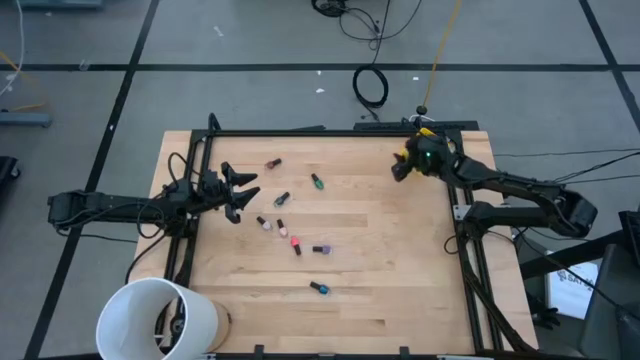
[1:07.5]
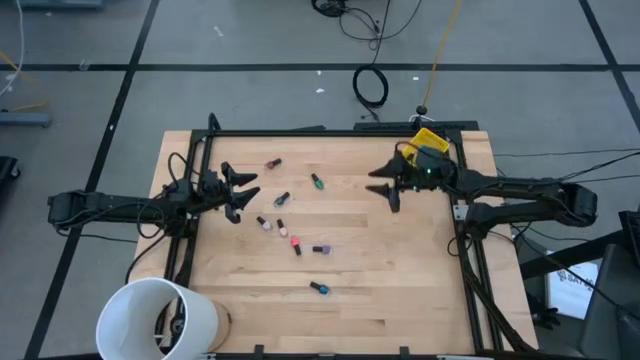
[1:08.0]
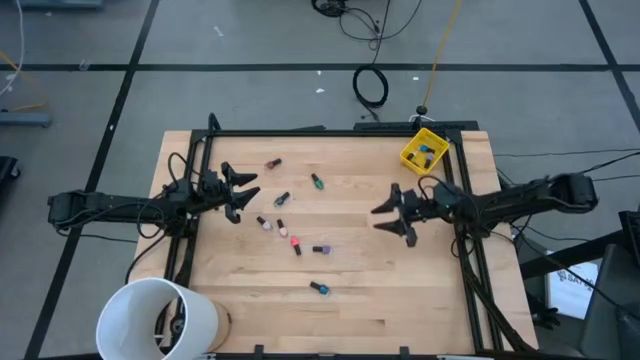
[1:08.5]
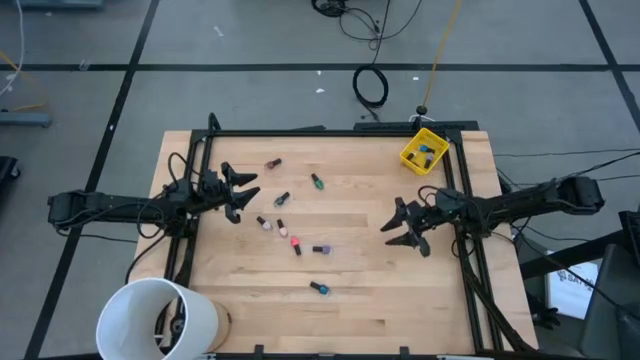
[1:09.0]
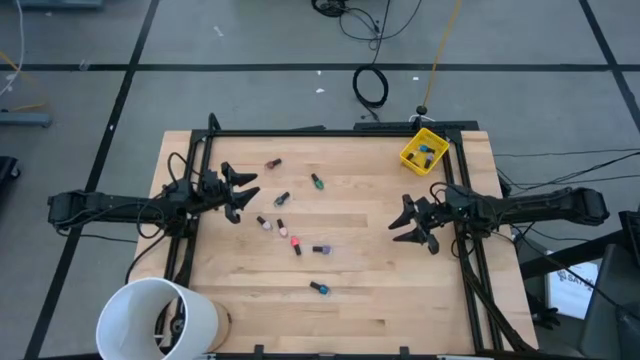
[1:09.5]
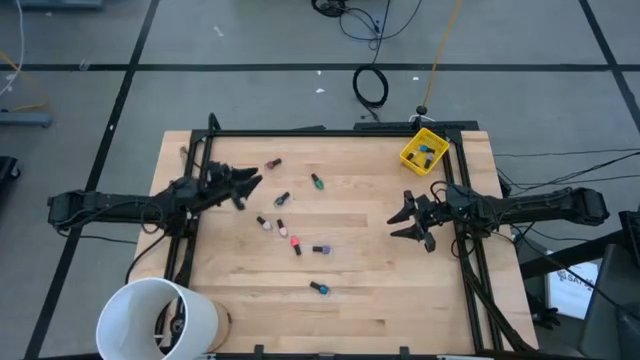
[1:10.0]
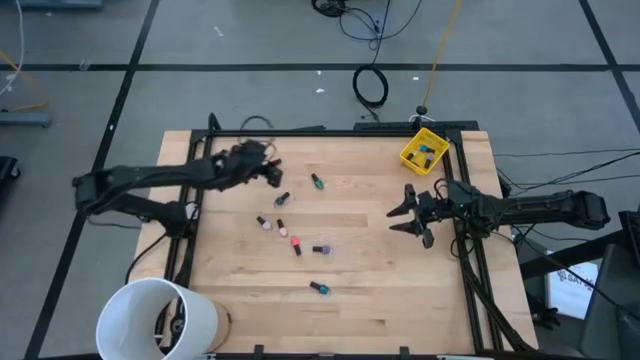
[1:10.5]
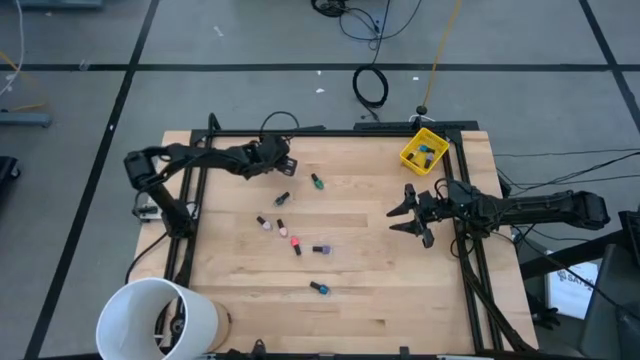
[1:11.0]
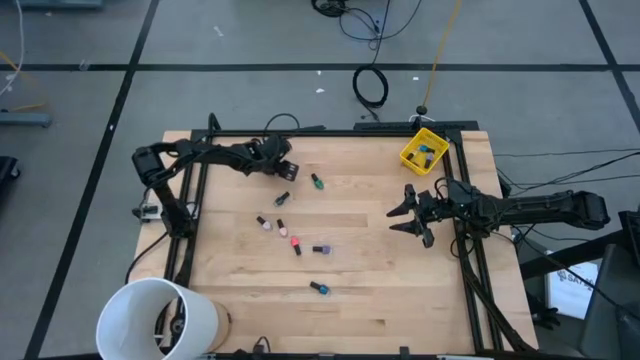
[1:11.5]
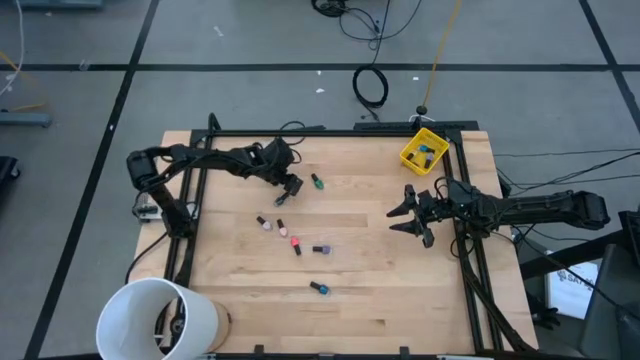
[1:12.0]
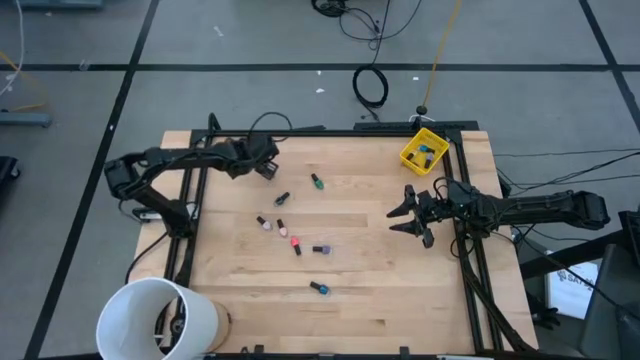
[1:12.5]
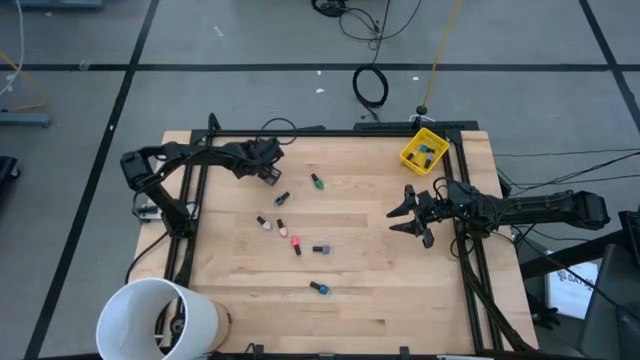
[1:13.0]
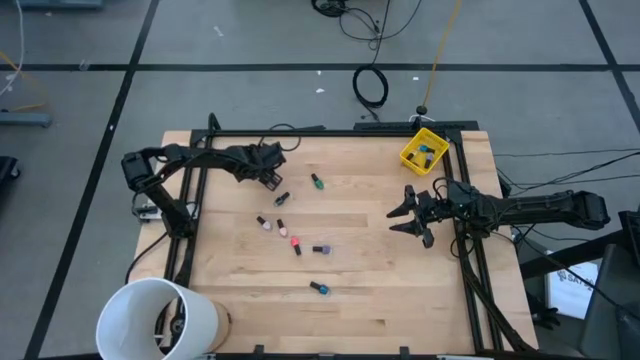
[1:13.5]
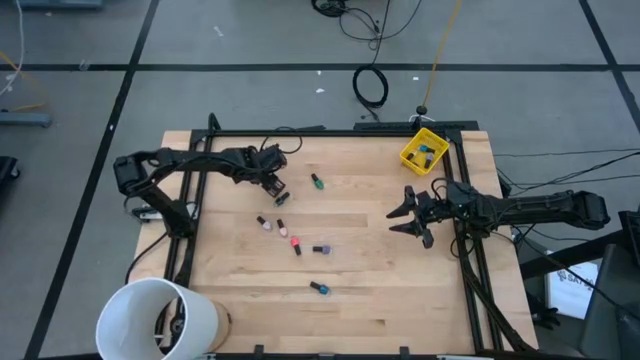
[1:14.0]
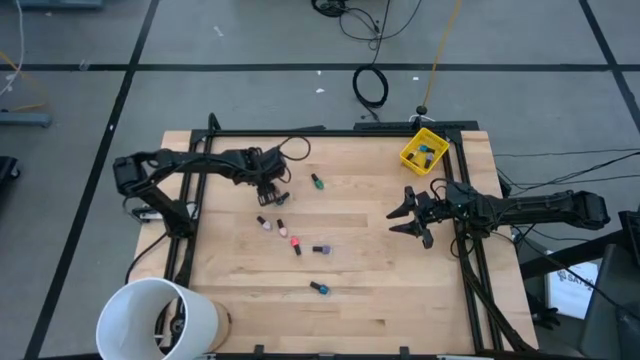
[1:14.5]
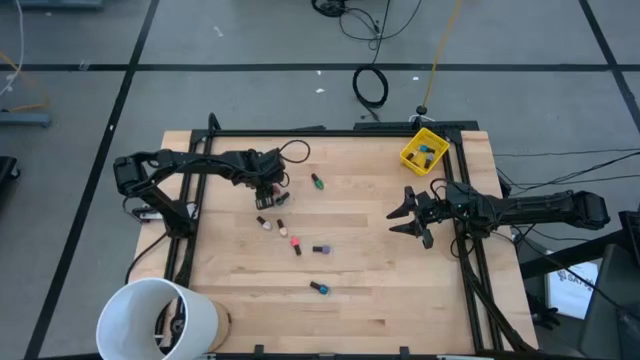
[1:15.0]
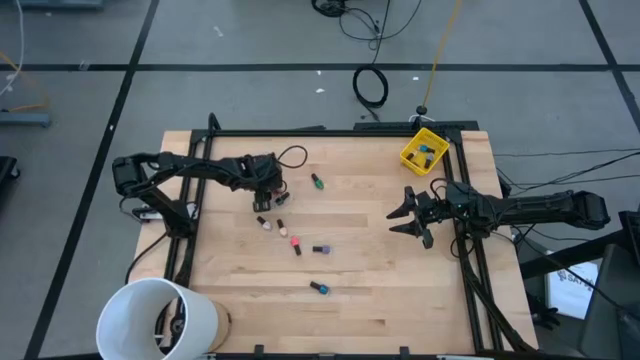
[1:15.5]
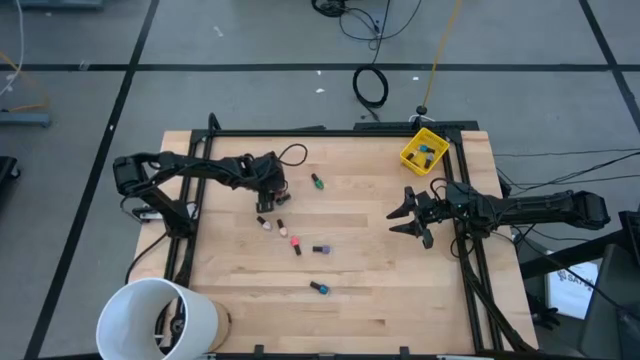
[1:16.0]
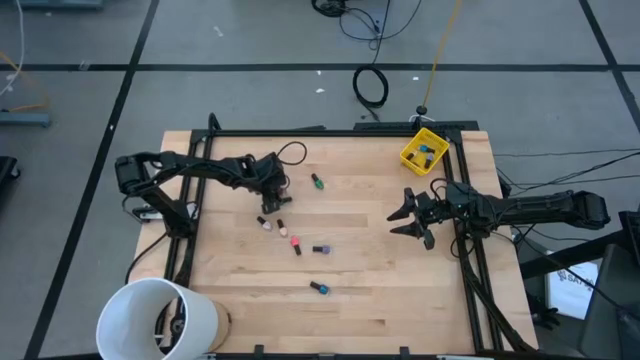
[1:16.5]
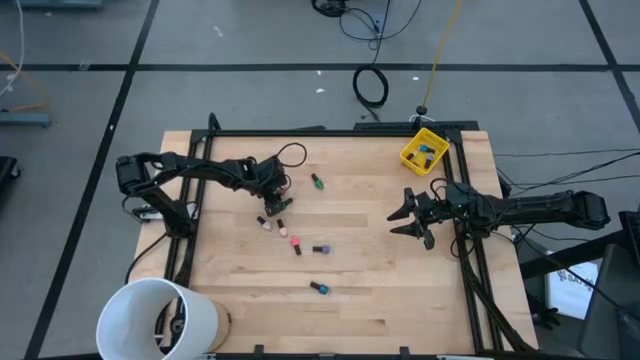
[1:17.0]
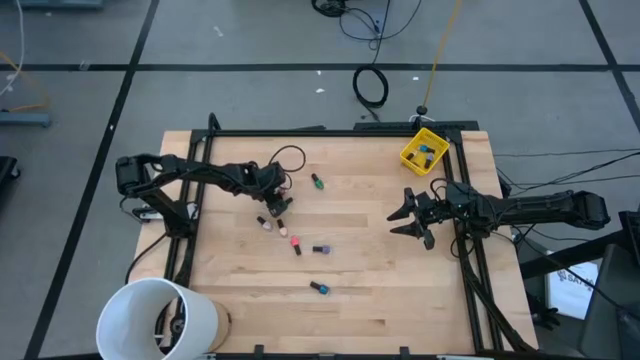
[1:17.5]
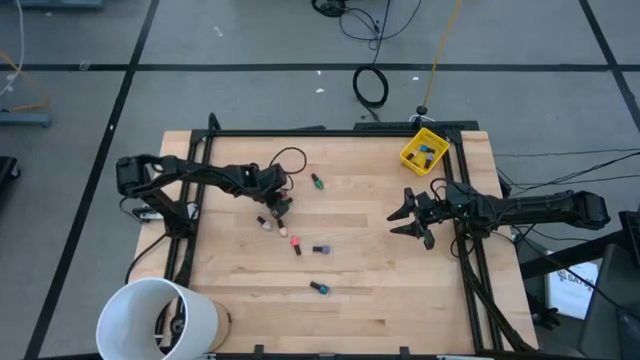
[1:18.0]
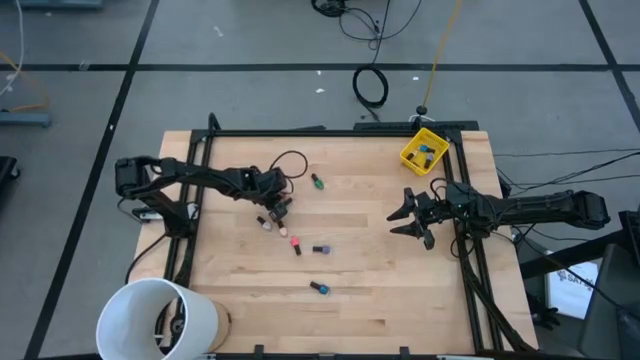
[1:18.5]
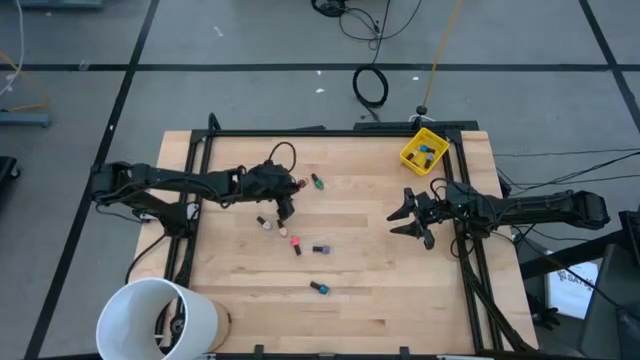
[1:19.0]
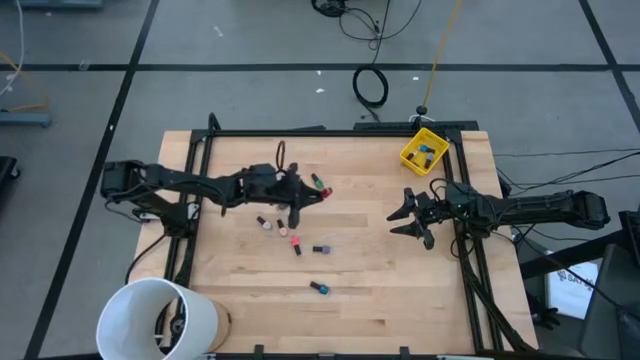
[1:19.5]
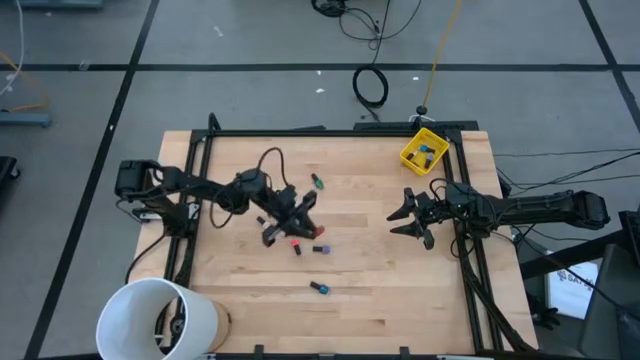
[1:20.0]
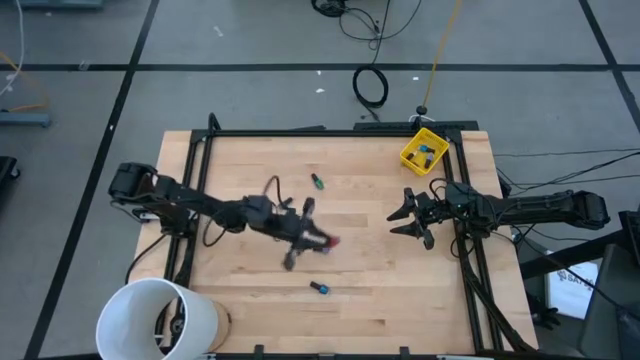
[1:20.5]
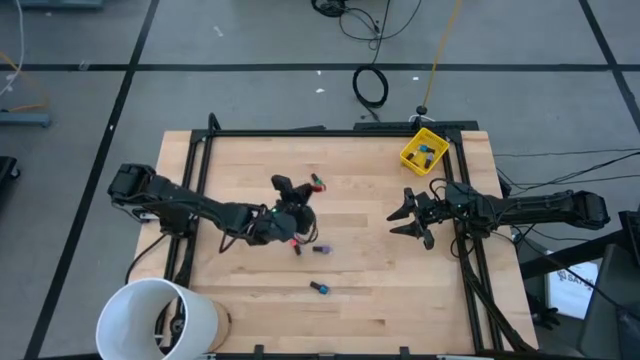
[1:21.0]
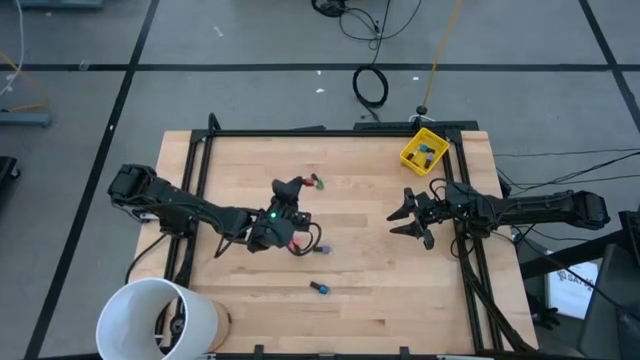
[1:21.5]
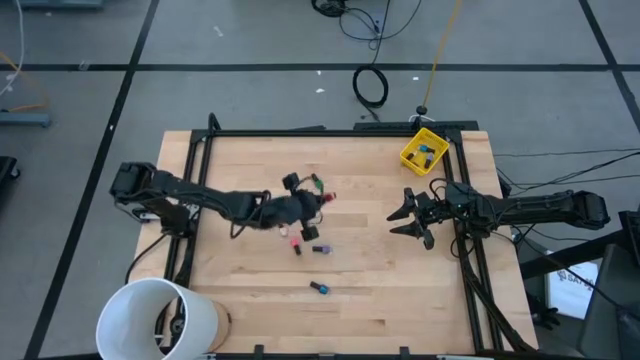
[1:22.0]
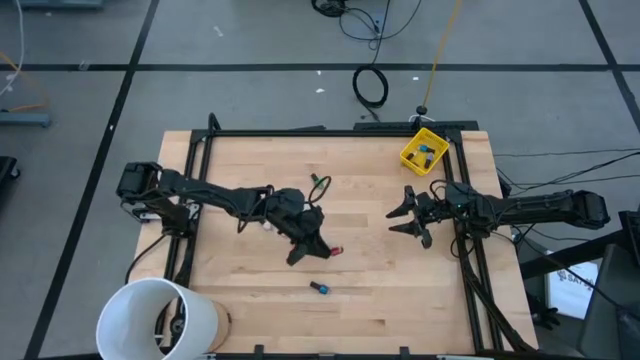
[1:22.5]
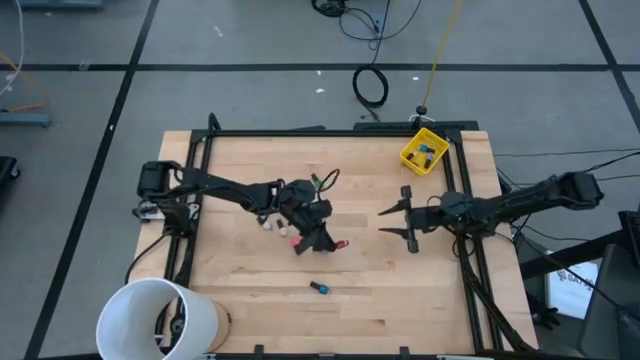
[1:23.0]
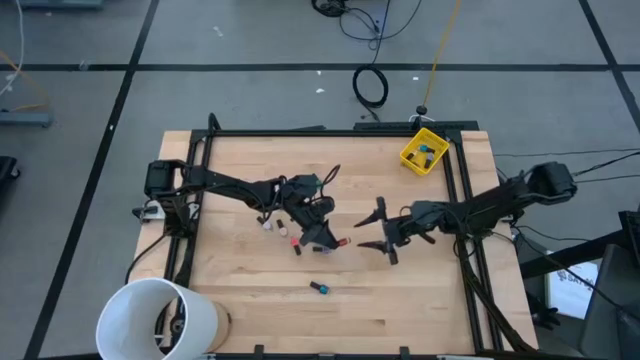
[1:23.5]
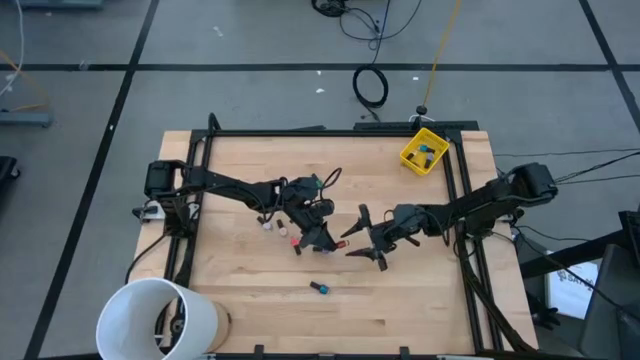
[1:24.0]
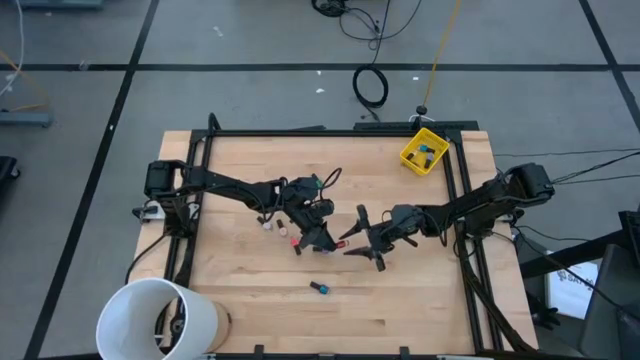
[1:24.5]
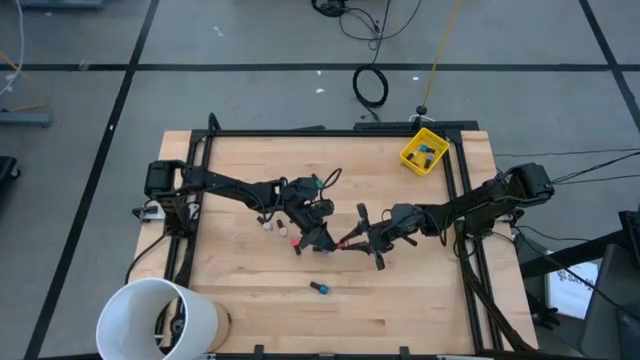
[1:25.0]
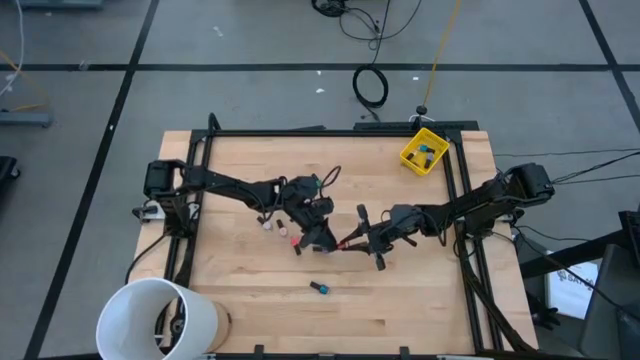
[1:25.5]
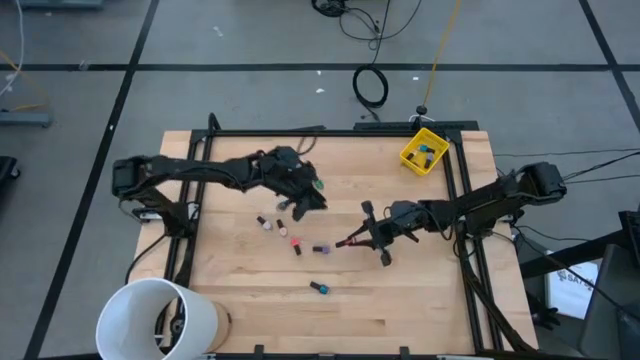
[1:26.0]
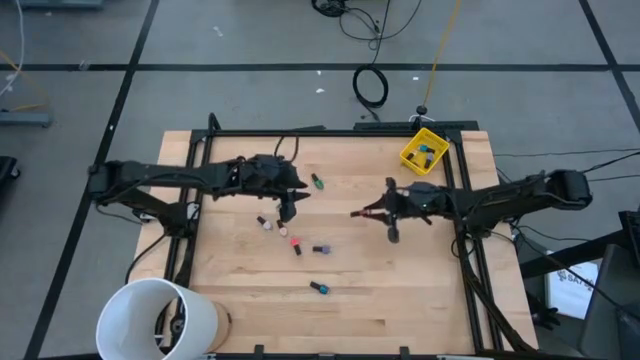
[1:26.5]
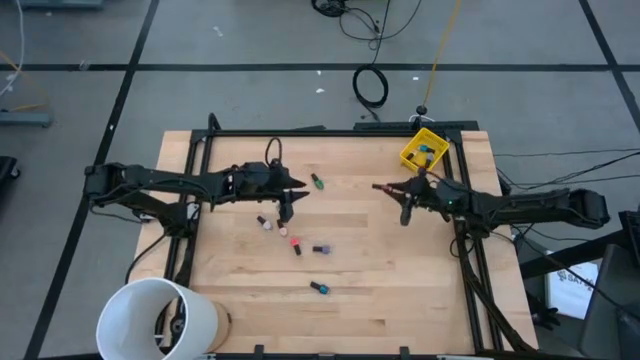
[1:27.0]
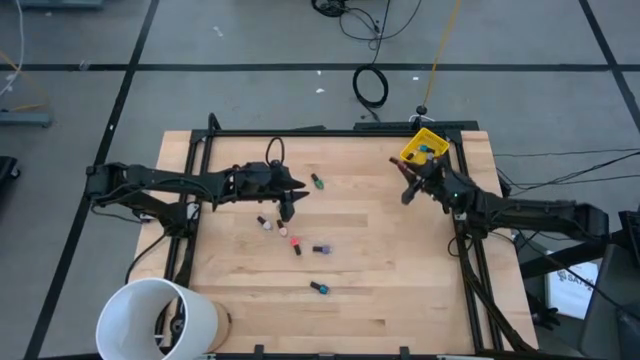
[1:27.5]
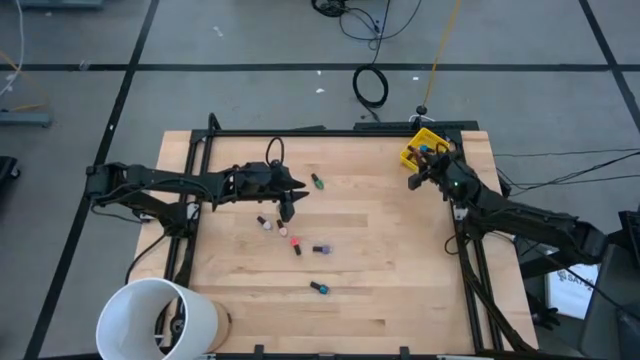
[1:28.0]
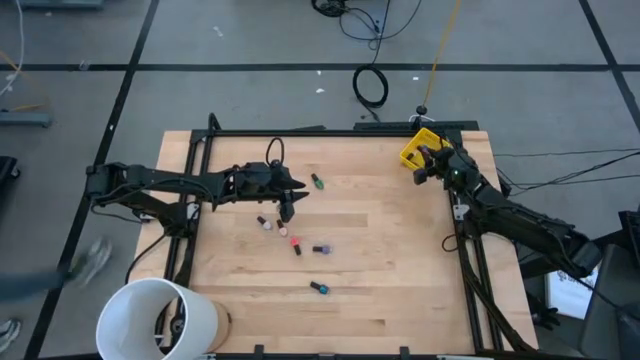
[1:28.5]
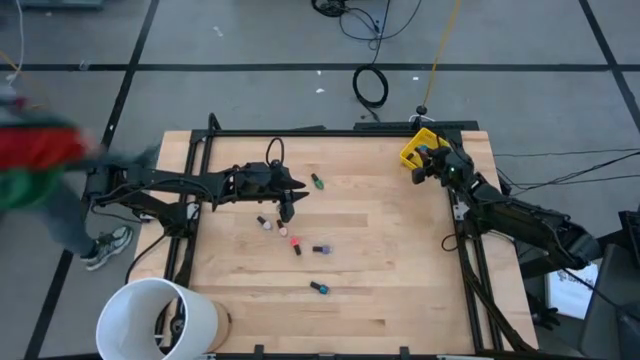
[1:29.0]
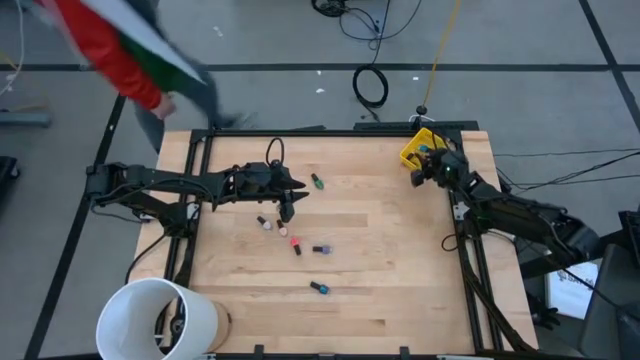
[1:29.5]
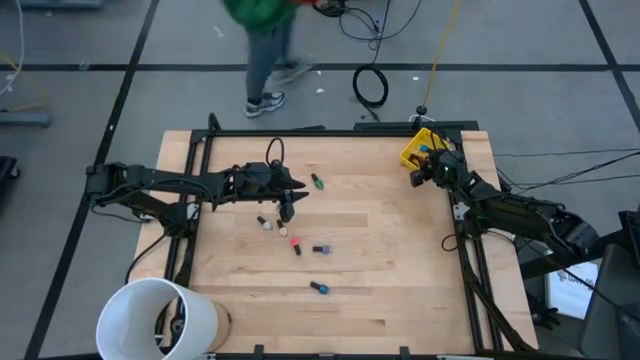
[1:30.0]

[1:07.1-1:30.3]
Task: Pick & Place Nail Polish
Put the red nail polish bottle into the yellow bin
